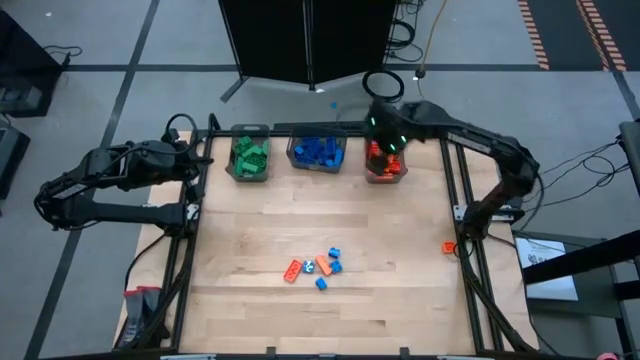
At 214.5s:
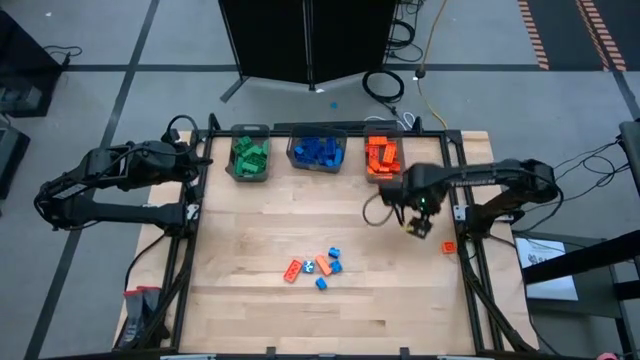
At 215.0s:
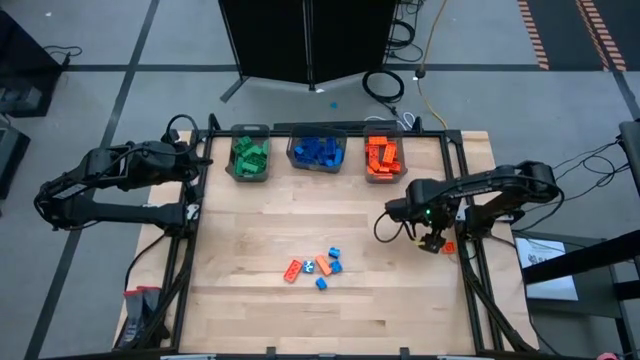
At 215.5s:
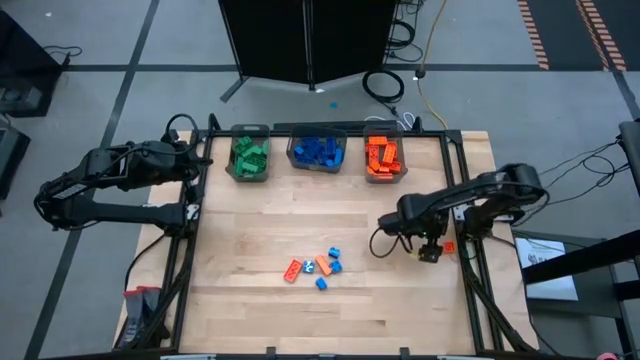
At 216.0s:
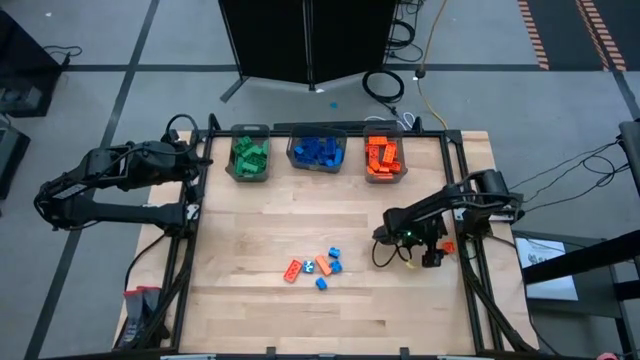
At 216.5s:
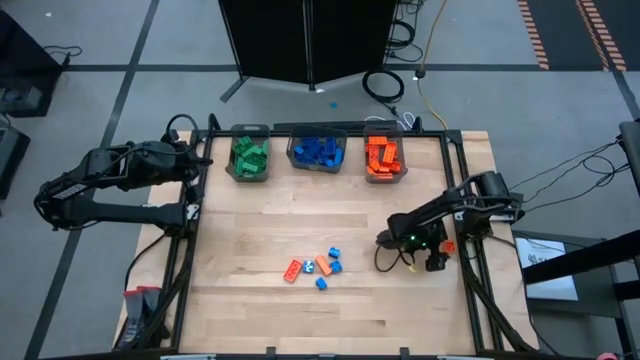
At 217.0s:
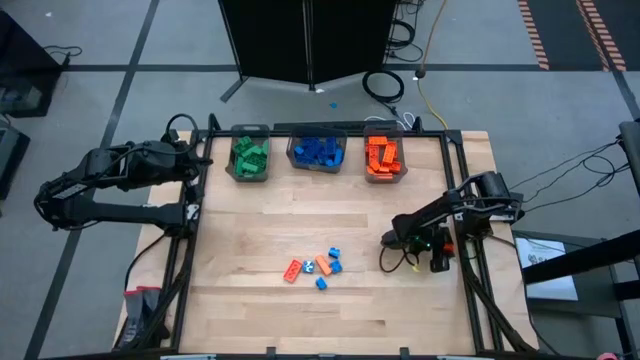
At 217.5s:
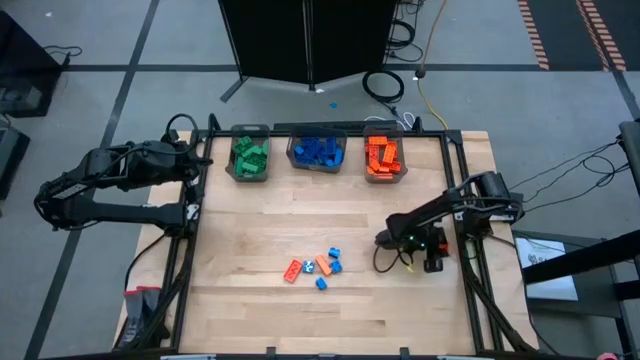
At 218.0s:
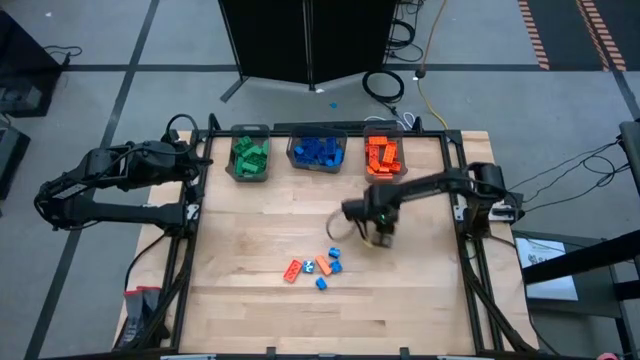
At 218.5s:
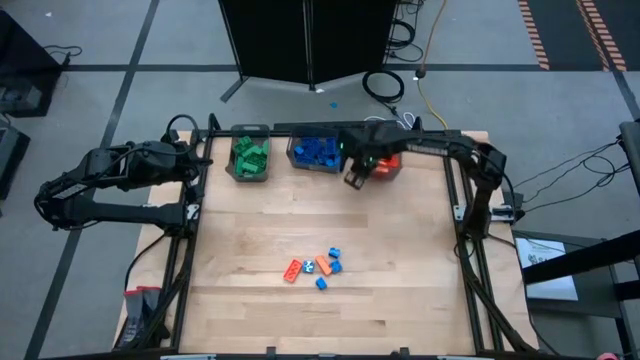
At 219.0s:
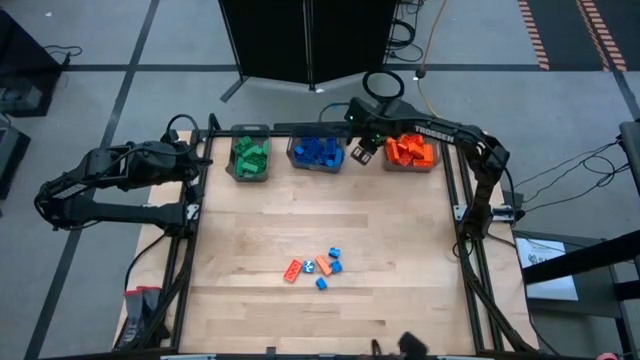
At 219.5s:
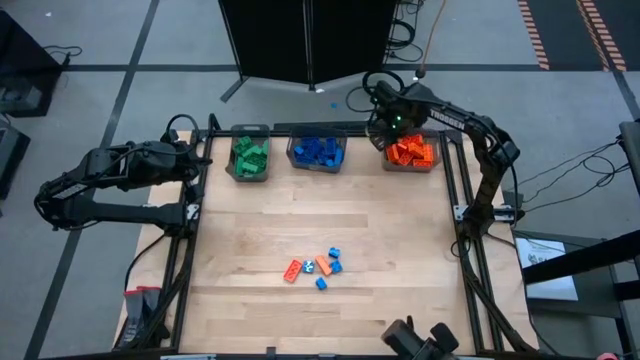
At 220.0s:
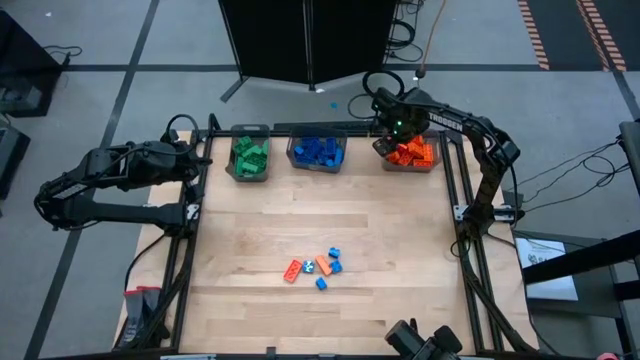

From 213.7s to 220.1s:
Task: Sort blocks
Put the orange game piece into the right black bin

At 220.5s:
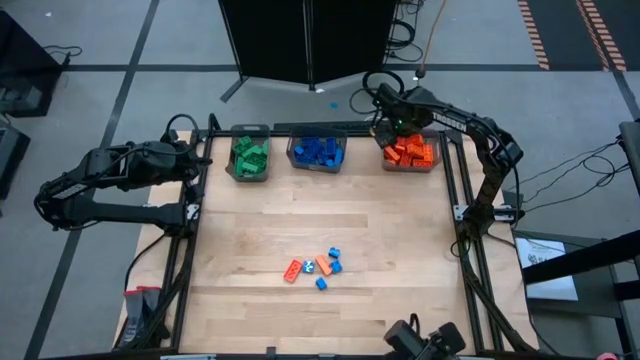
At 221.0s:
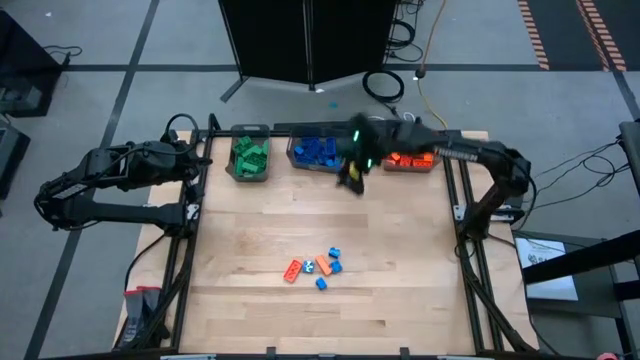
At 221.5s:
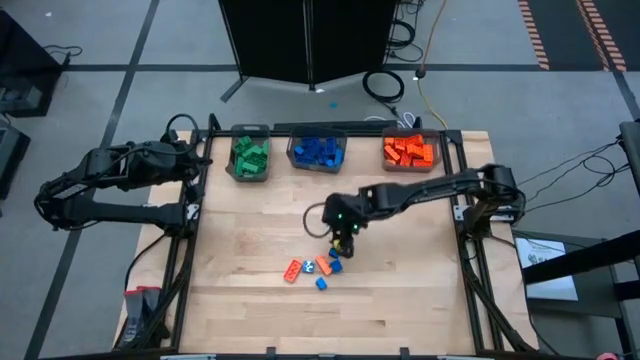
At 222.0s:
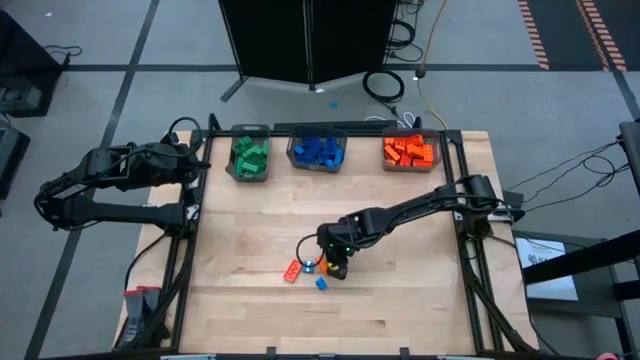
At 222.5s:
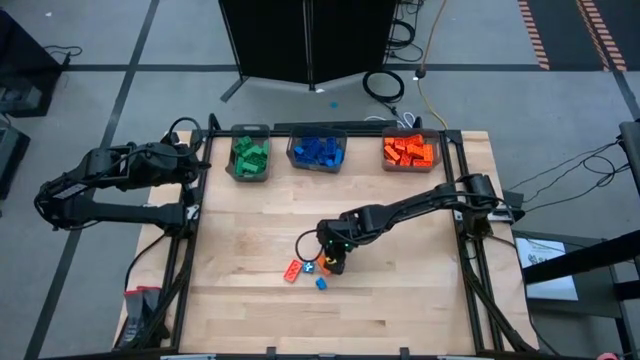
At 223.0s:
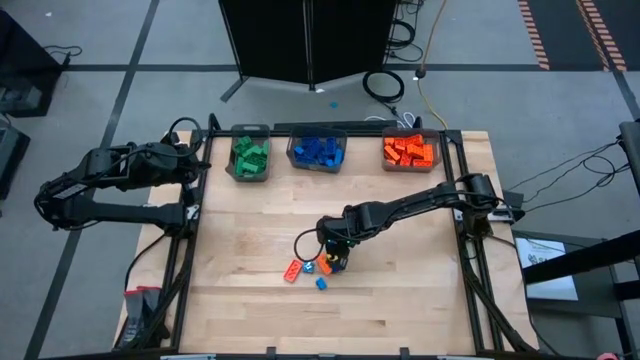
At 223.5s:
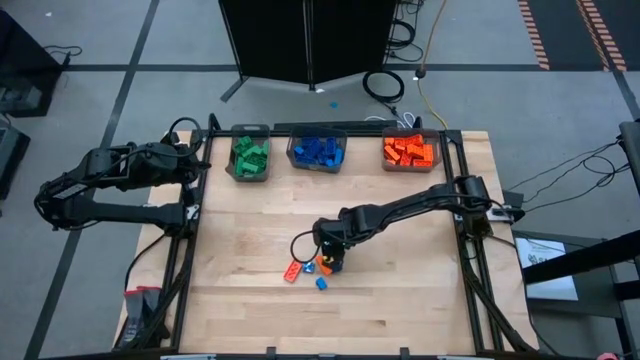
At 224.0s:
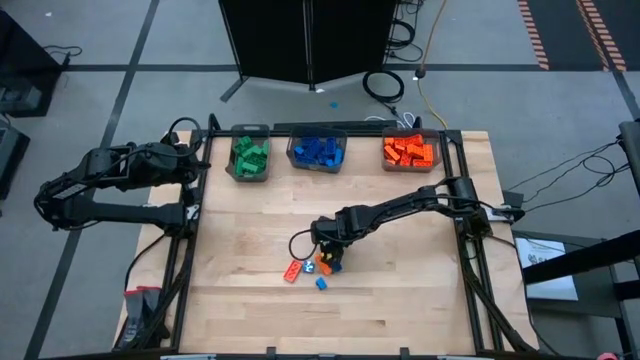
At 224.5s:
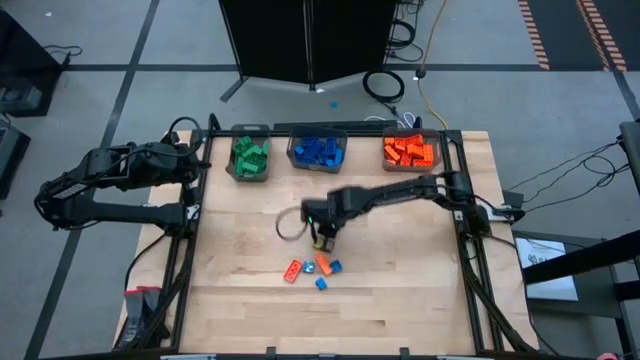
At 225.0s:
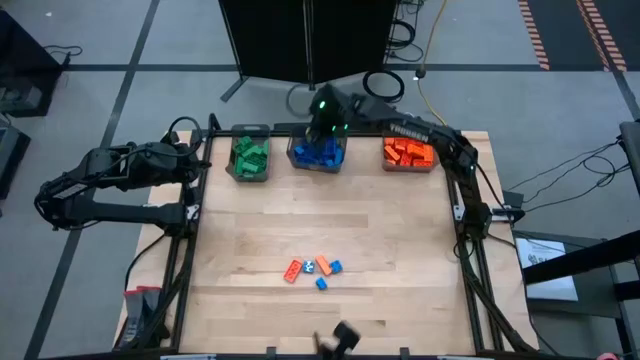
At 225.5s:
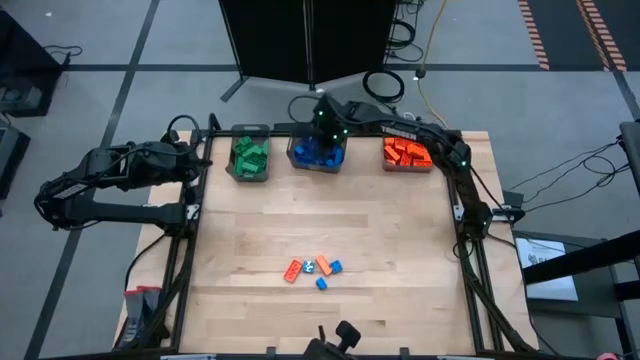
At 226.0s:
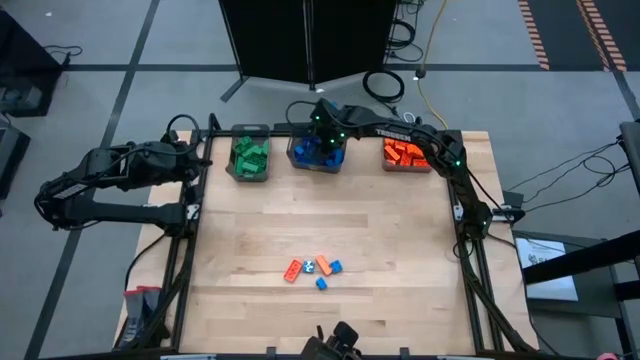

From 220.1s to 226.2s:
Put the blue game piece into the middle black bin

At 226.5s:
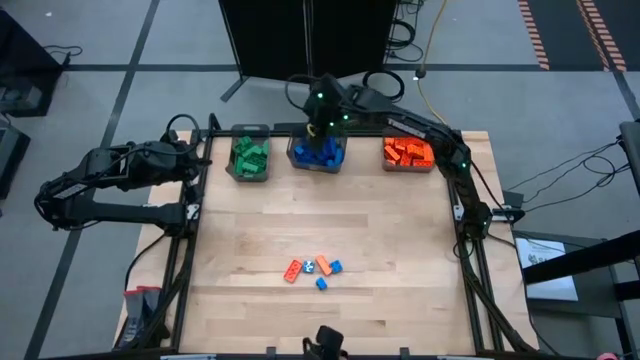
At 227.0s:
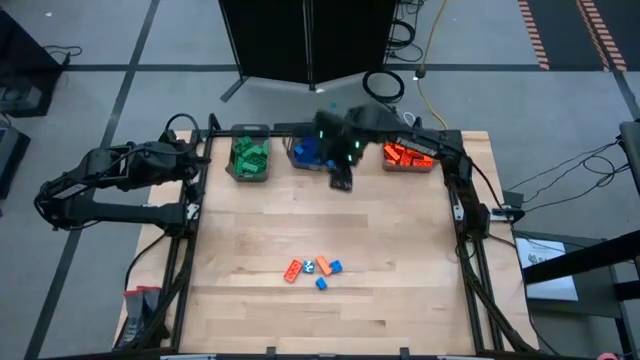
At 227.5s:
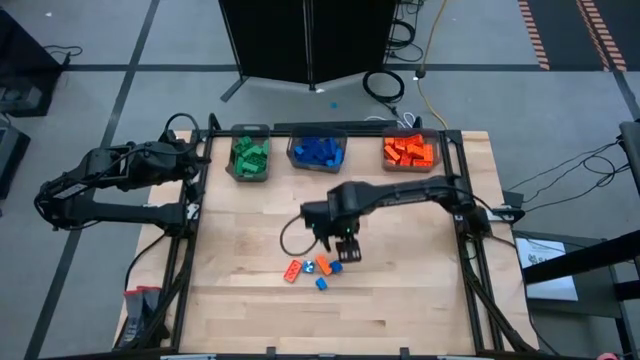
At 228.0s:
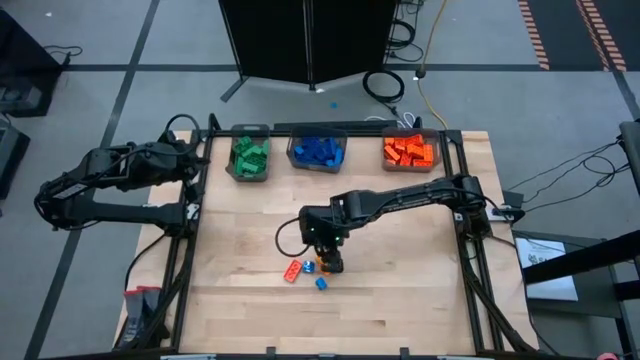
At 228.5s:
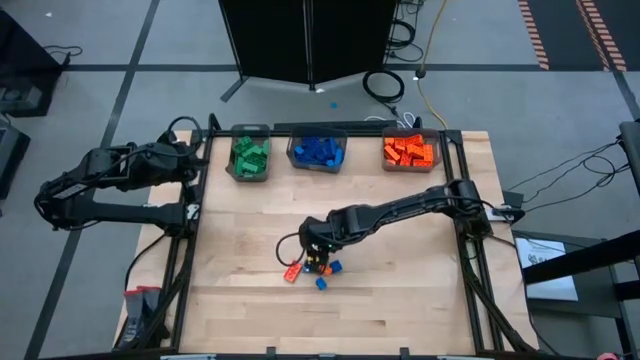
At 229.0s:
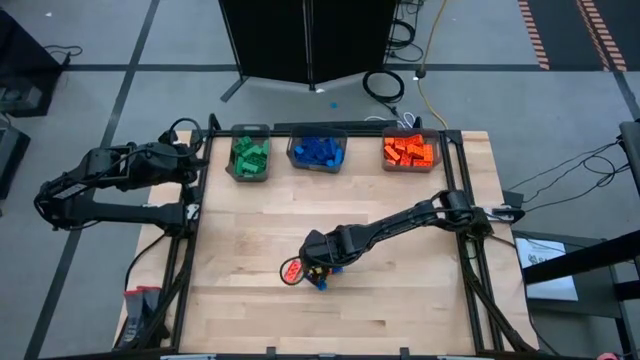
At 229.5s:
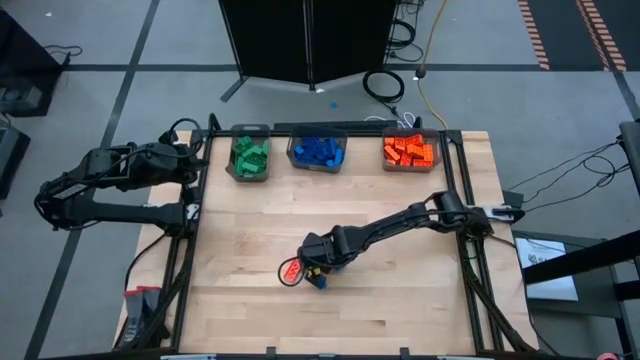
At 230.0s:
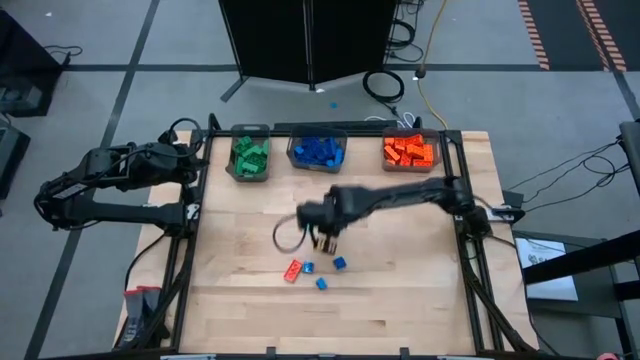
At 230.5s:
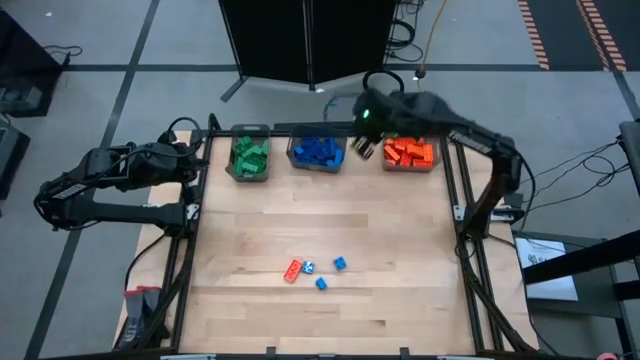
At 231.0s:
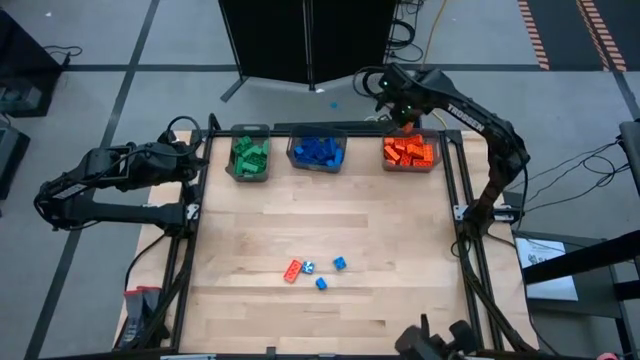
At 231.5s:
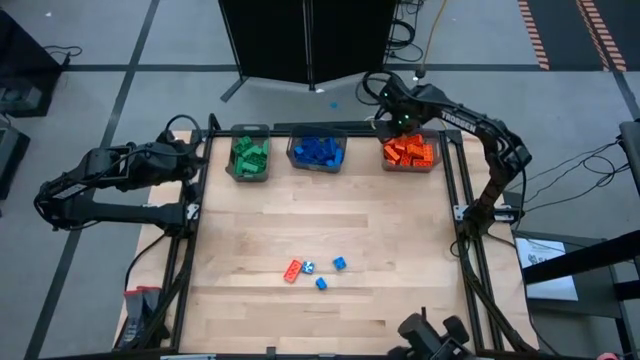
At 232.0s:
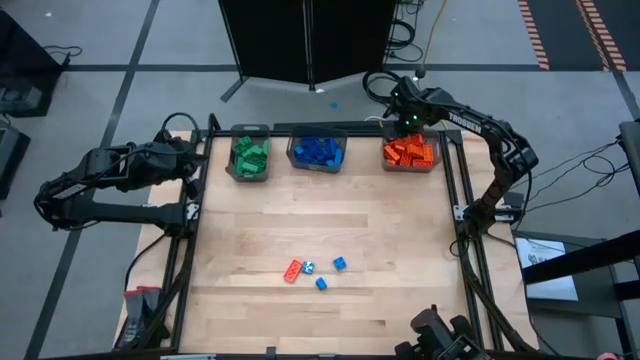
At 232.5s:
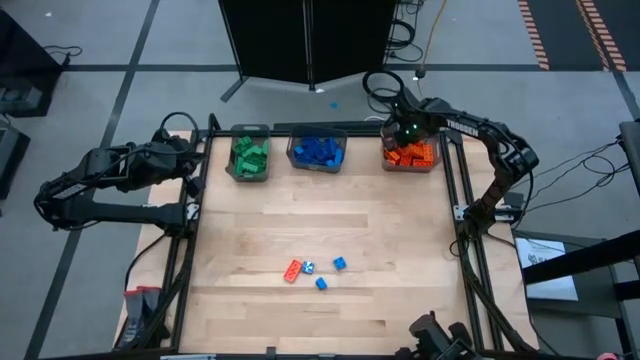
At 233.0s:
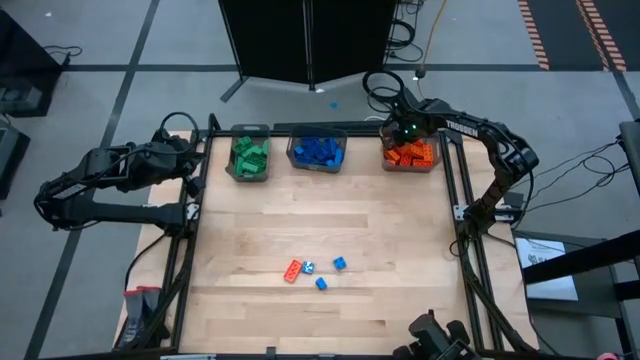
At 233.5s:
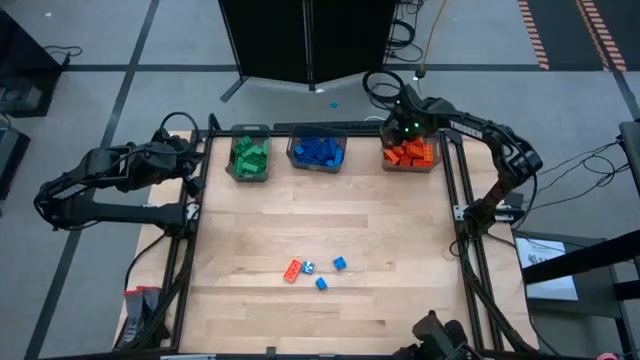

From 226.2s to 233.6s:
Put the orange game piece into the right black bin

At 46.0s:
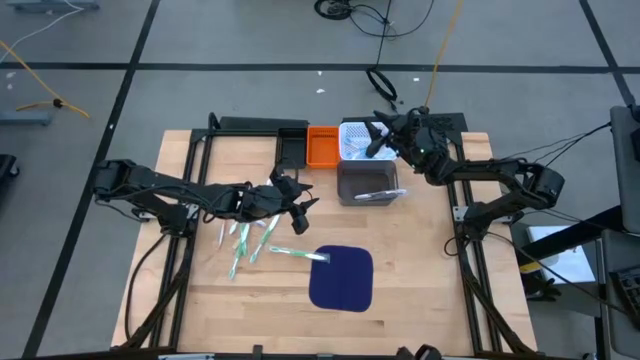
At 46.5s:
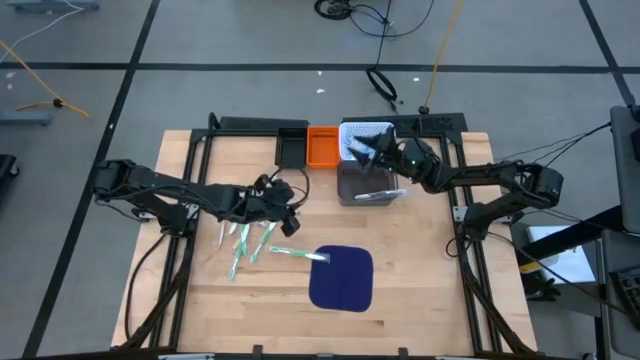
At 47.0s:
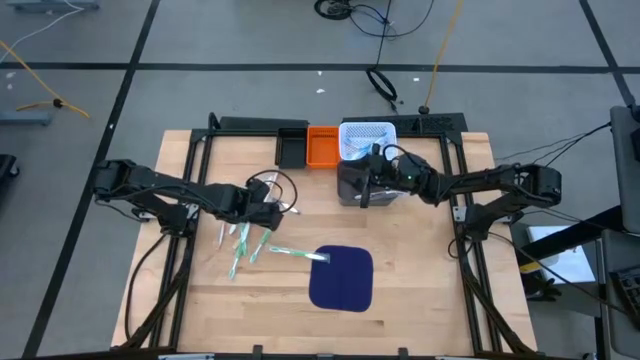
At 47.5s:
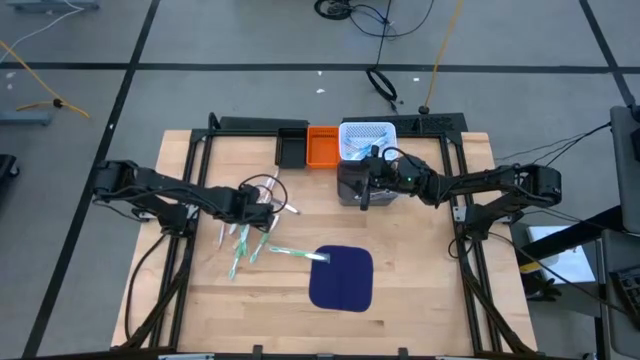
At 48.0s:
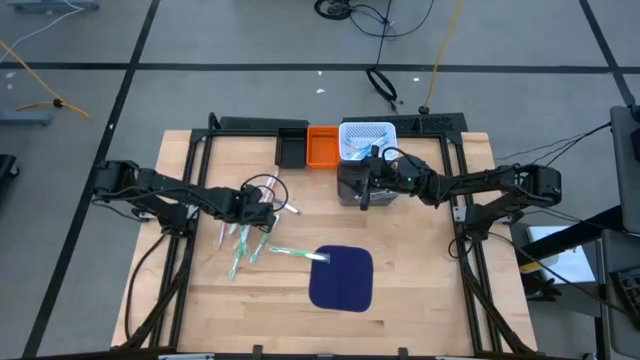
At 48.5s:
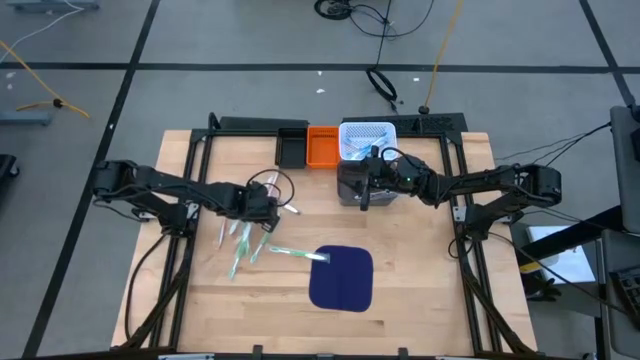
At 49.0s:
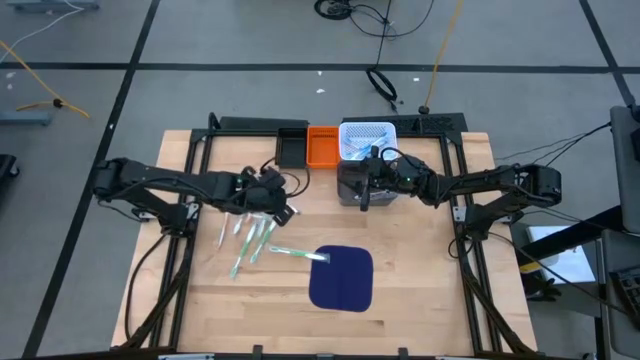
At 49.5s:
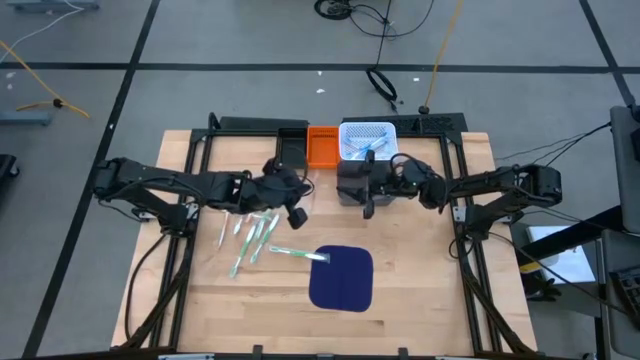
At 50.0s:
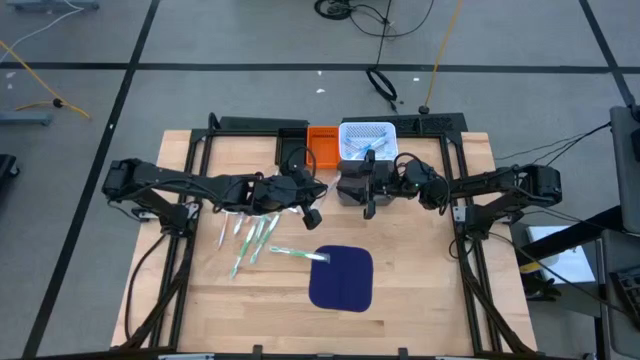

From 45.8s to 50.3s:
Task: Pick & Place Toothbrushes
Put the orange toothbrush into the orange basket
